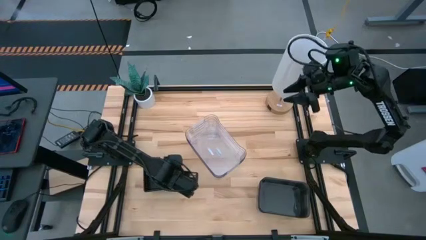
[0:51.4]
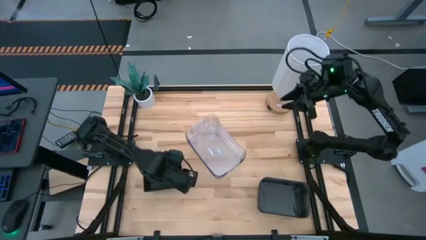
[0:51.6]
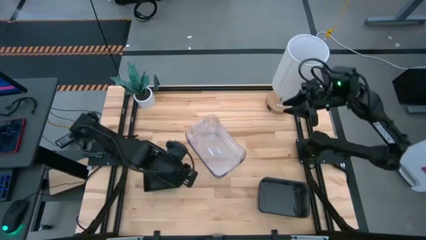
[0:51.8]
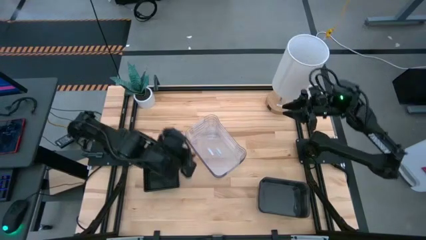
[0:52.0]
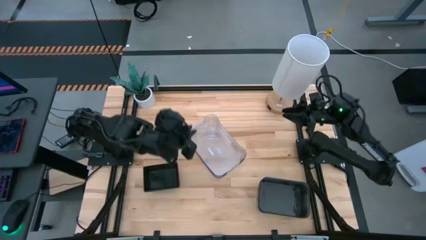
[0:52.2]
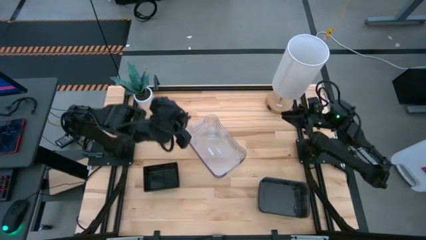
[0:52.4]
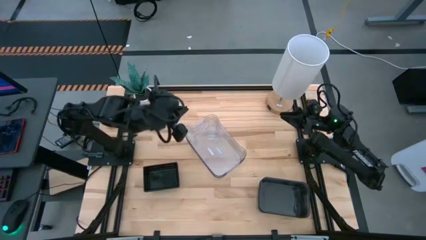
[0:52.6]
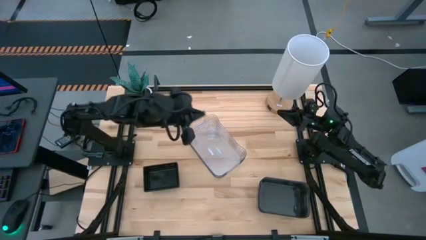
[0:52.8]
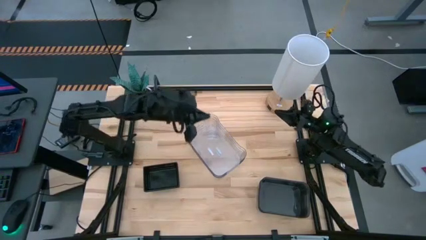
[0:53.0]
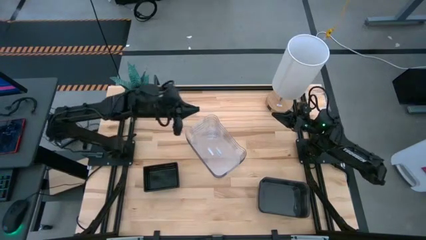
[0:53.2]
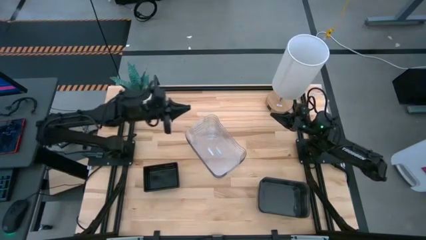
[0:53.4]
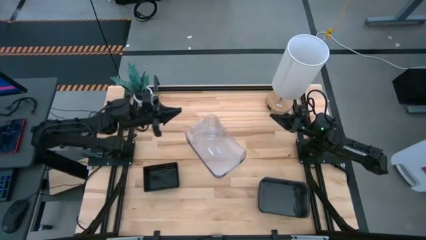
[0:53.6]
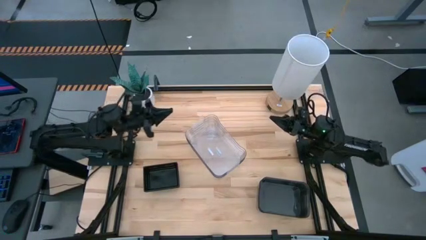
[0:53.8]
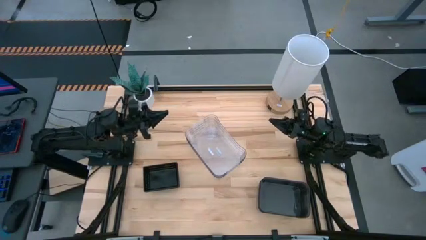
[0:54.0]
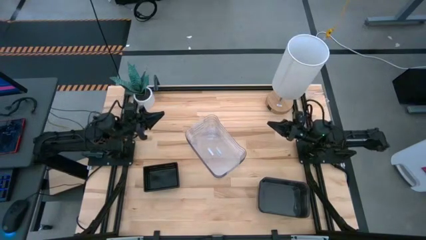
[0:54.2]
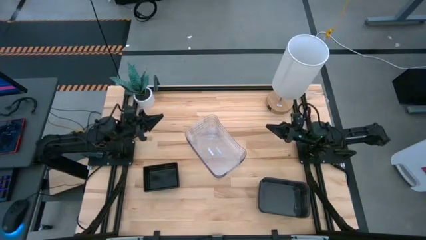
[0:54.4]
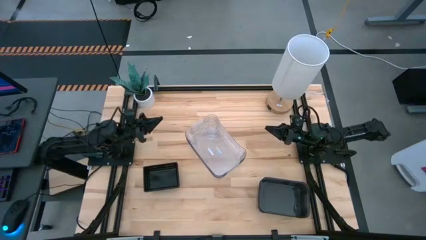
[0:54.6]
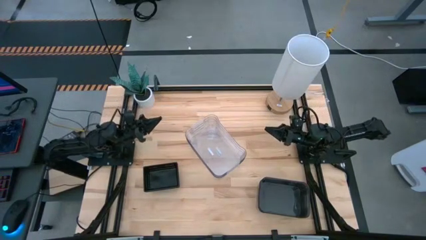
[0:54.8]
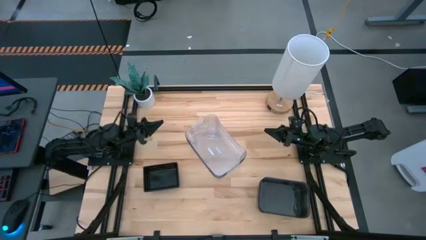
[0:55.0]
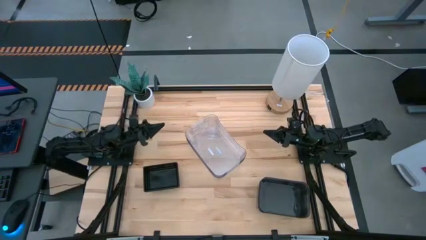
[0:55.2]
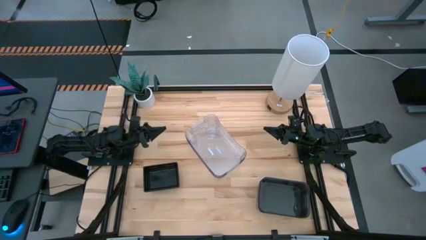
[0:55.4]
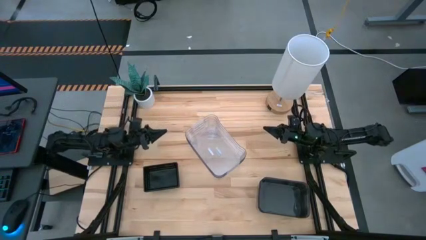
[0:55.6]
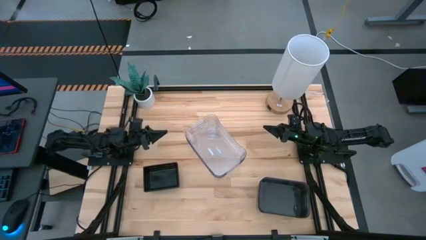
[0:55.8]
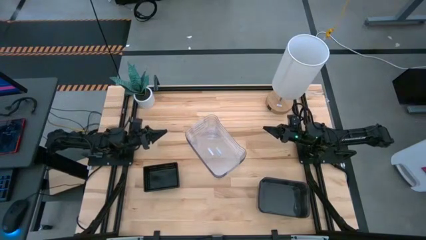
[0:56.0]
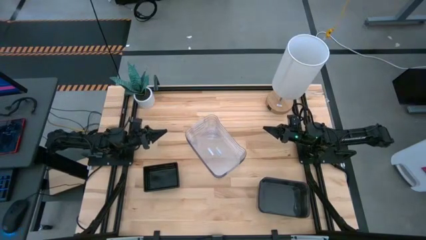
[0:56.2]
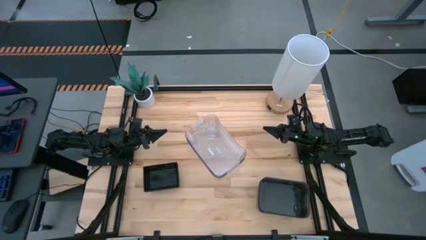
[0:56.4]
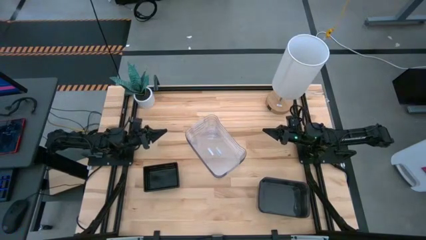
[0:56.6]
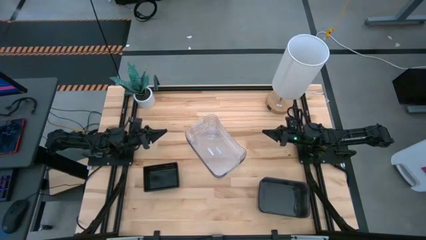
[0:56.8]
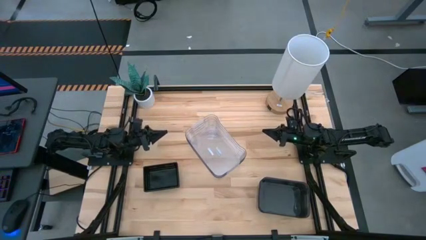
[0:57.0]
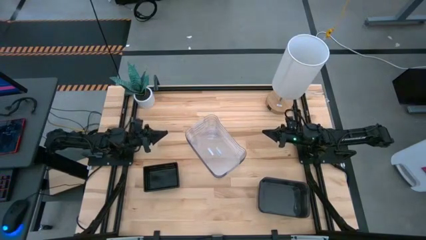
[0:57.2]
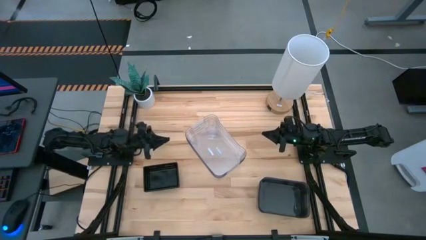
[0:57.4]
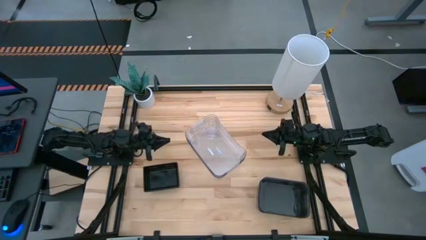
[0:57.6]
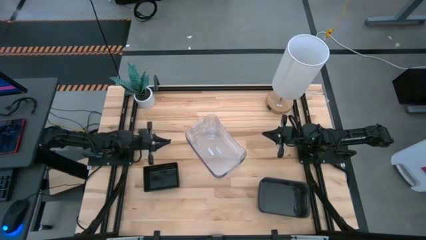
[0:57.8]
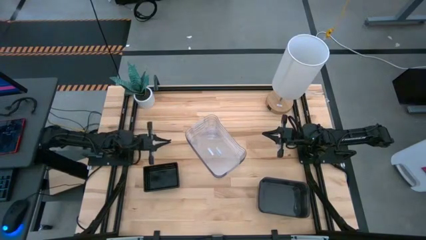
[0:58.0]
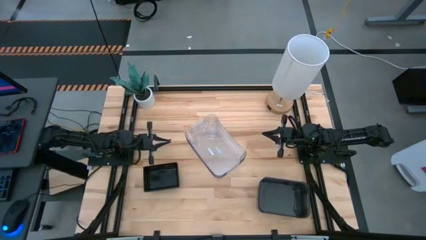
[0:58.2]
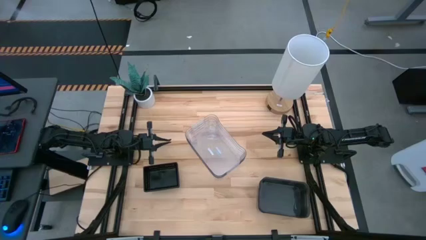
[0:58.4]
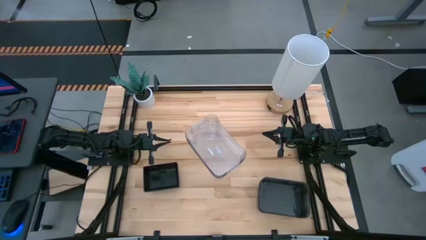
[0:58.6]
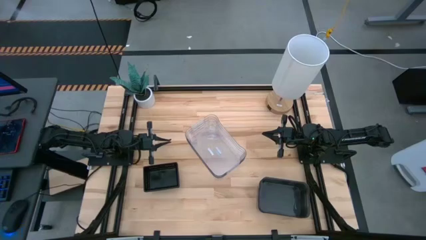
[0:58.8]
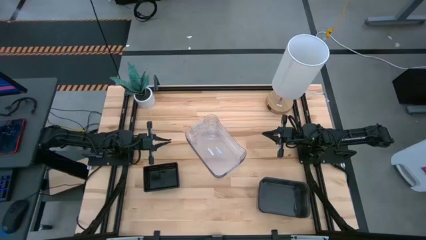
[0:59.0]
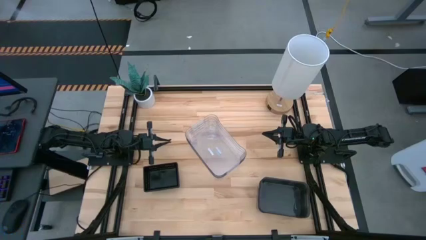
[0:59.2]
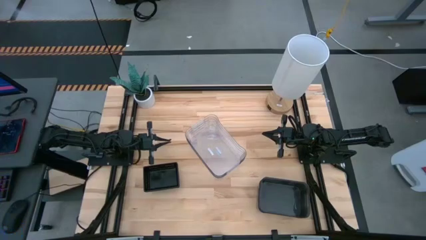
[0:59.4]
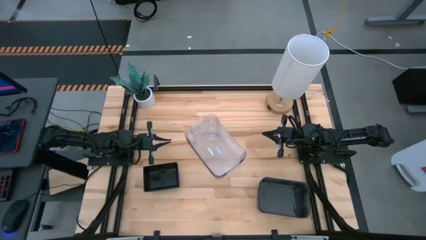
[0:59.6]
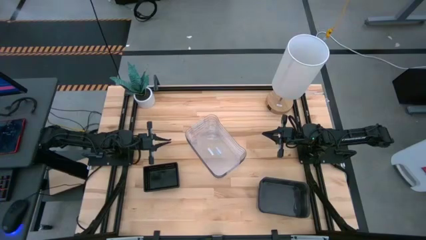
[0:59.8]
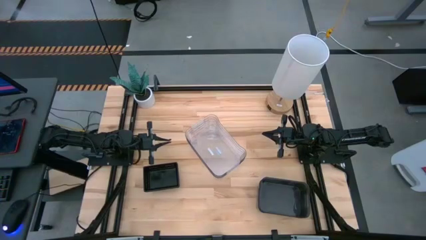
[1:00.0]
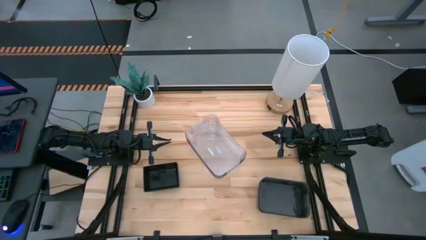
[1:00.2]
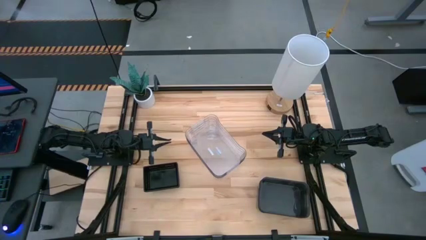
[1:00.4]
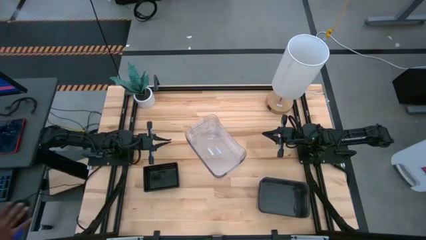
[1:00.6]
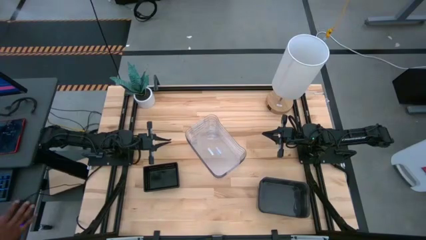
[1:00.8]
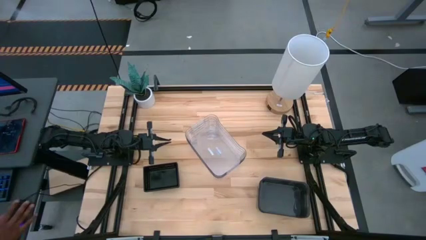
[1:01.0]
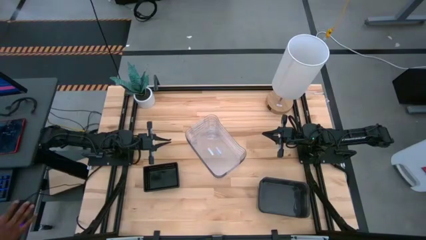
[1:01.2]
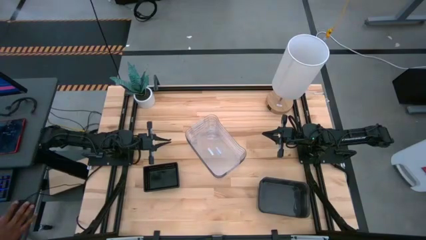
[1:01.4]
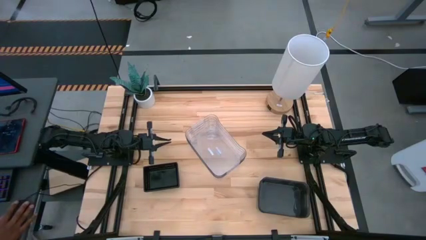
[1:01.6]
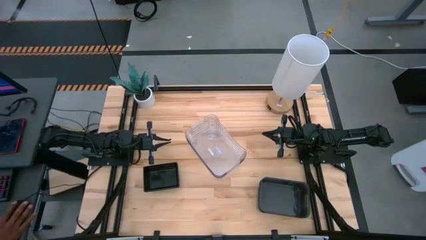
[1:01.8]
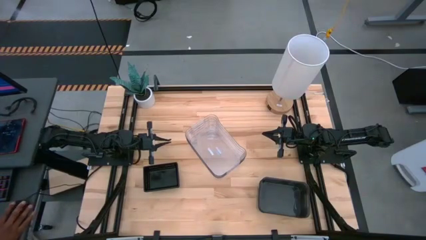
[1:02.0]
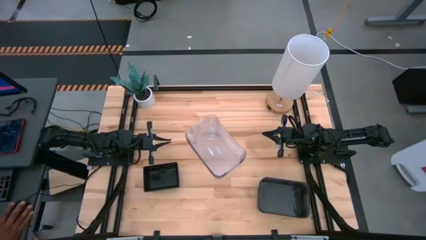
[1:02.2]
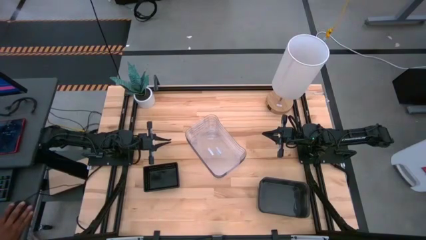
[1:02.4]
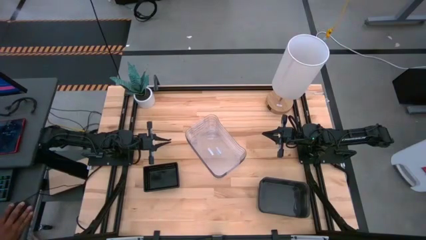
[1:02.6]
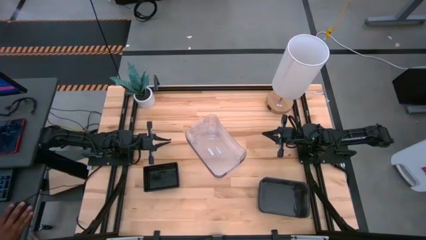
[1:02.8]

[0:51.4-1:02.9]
Return to Home Position
